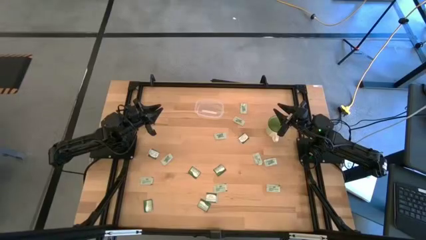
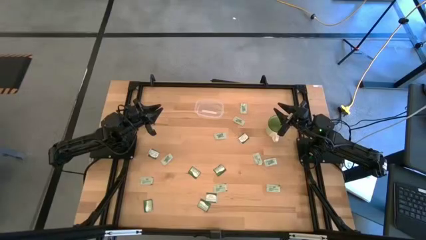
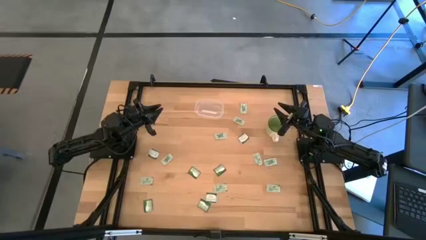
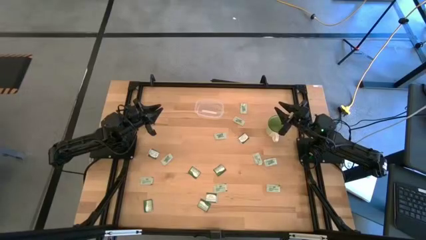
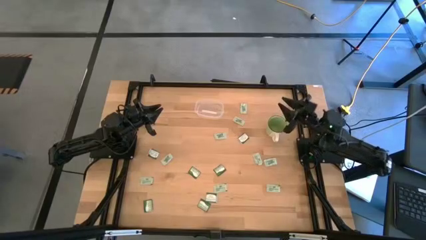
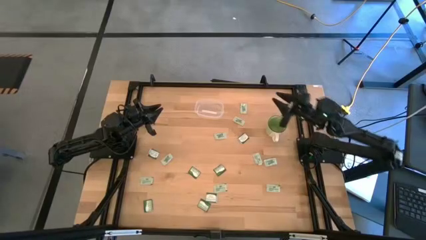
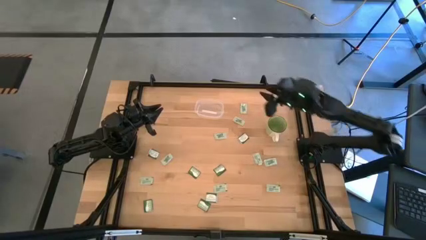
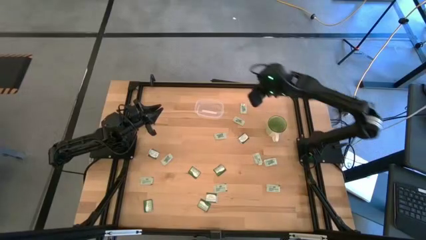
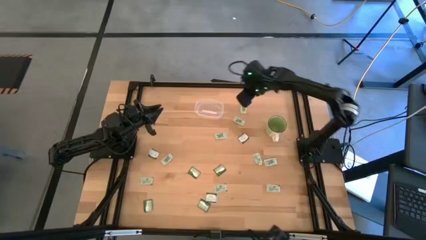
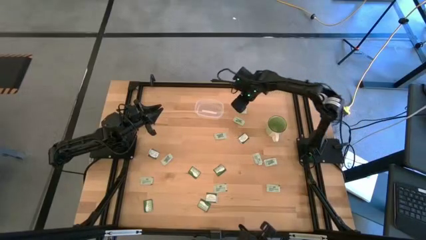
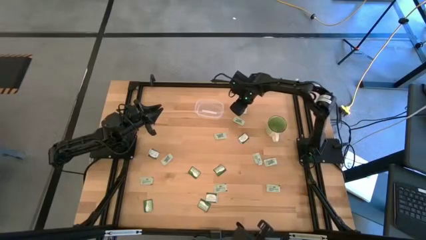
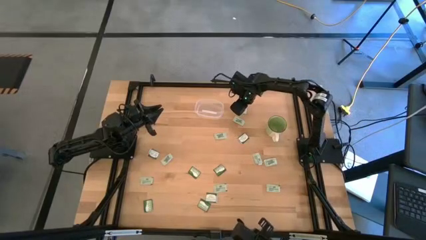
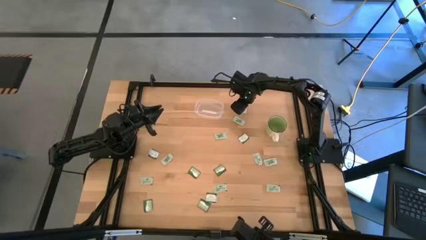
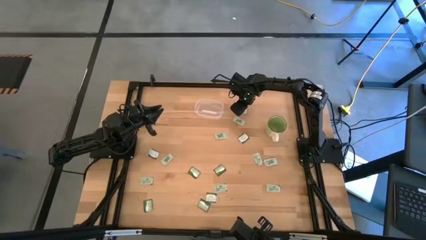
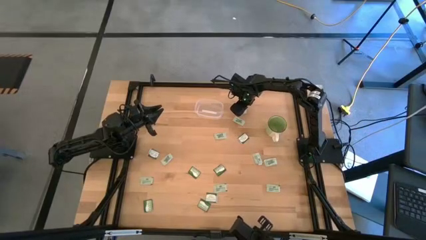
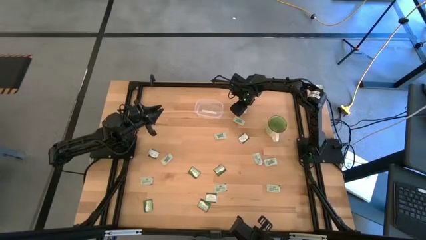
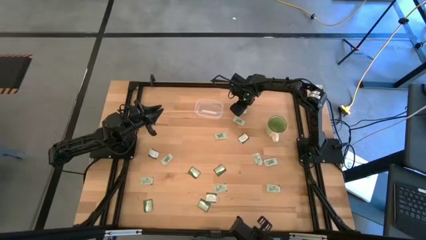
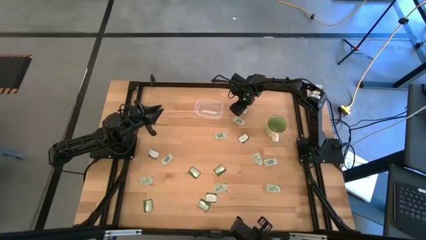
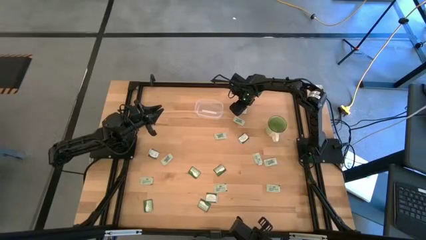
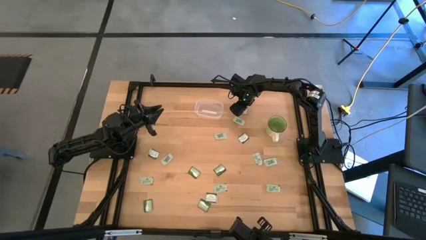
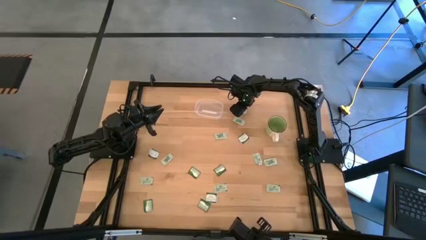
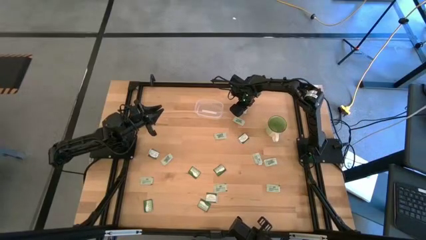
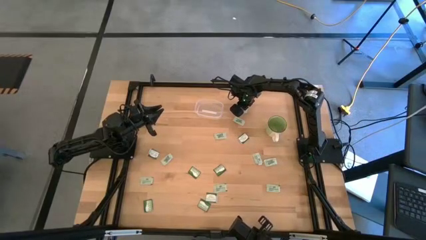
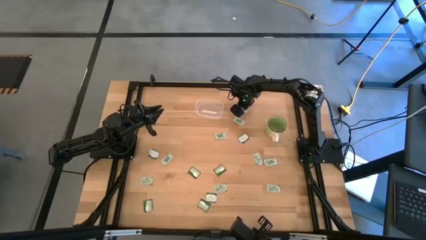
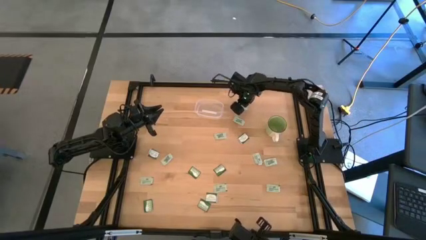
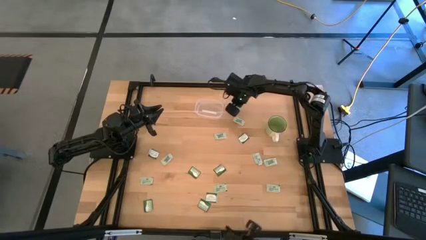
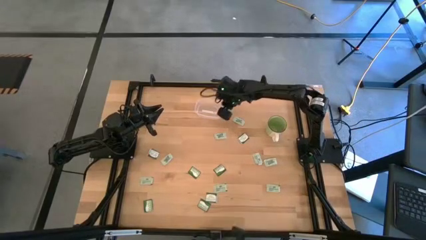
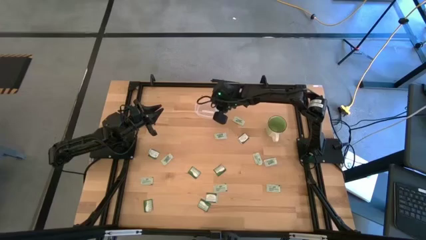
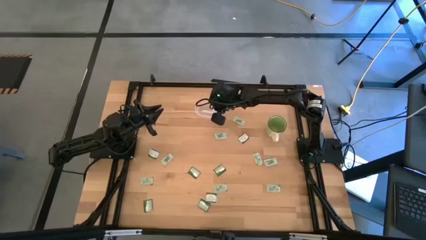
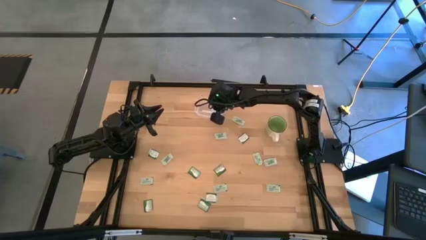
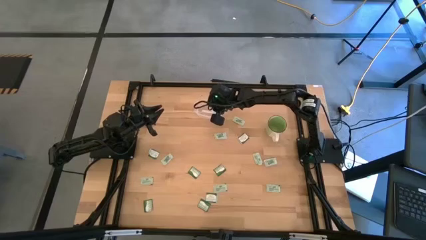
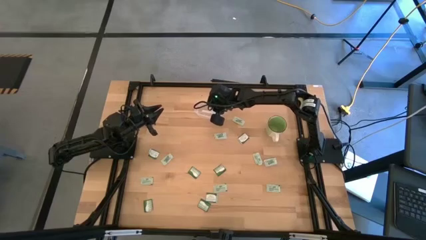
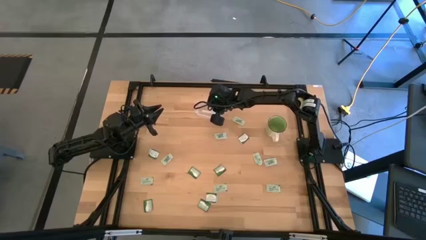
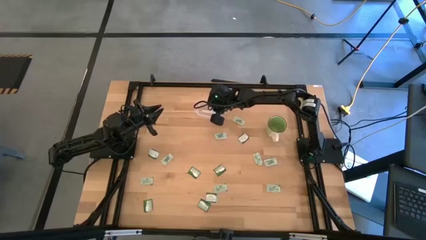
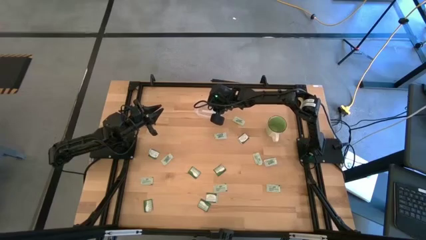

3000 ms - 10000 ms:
Task: Pick and place items into bin
Put the green stevia packet into the bin

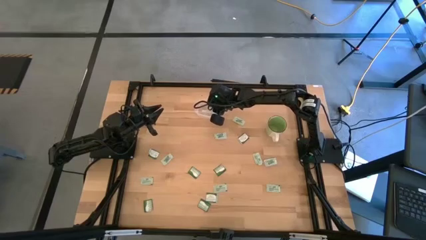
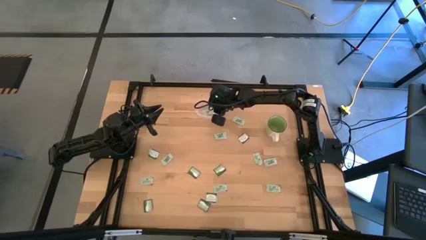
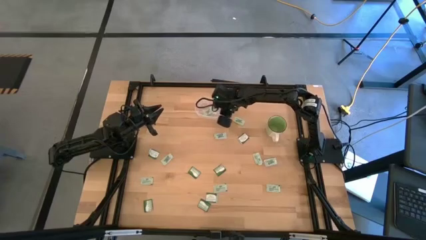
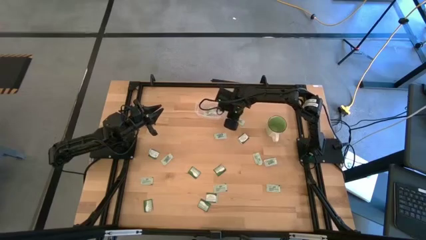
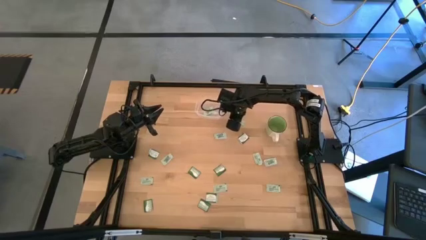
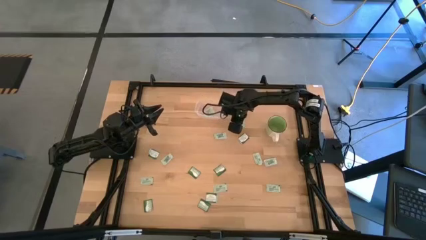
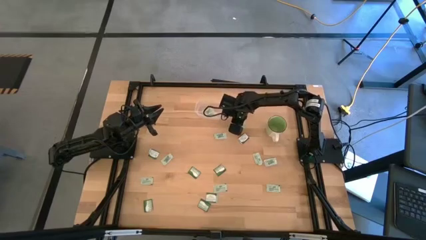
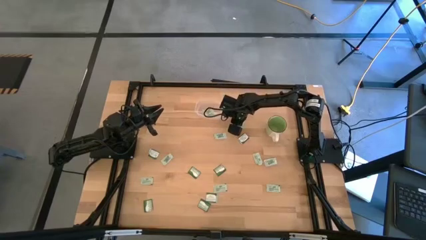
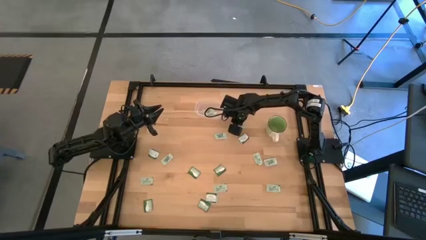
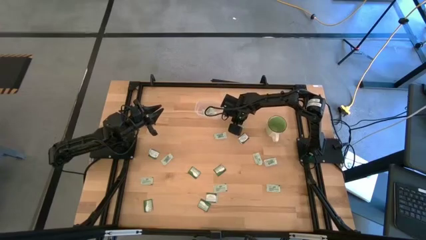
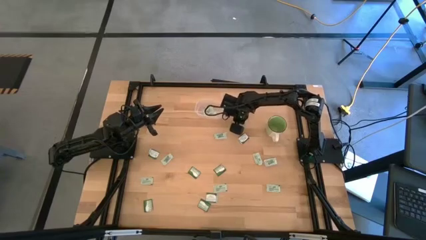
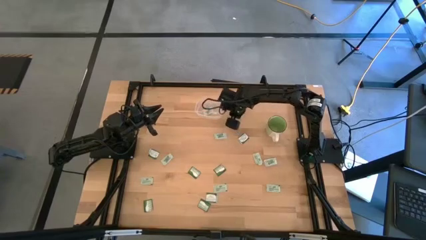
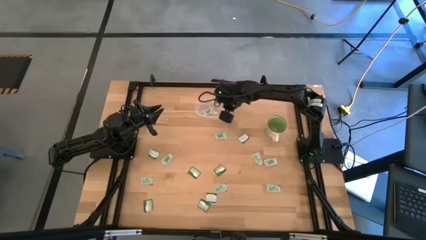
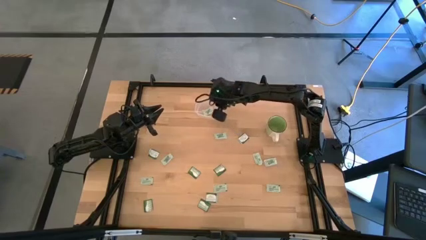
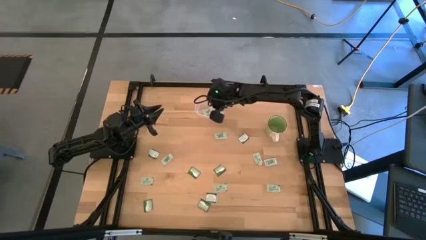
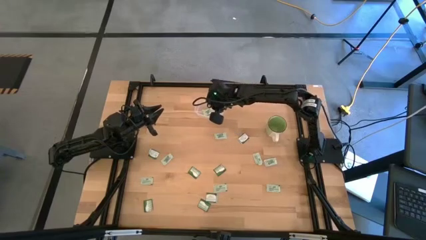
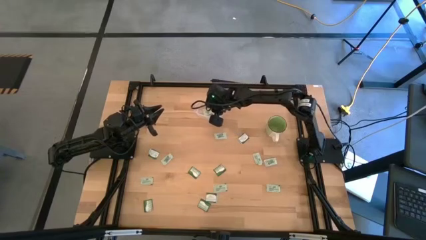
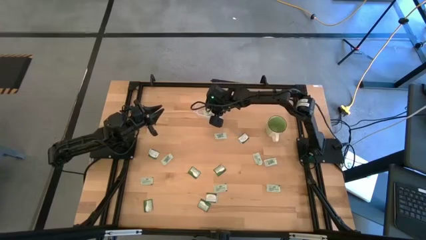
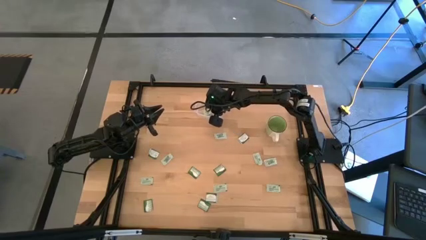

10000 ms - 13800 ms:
Put the green stevia packet into the bin

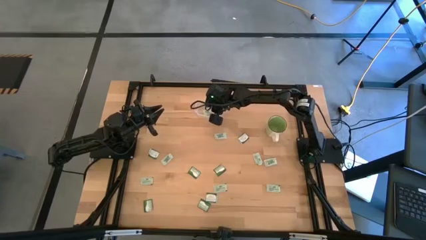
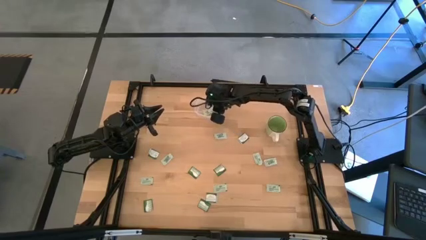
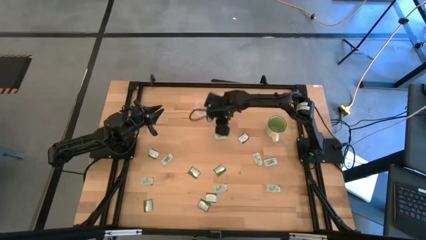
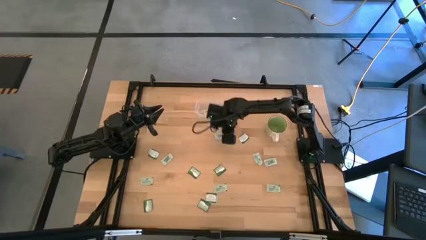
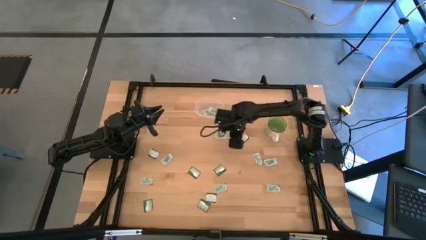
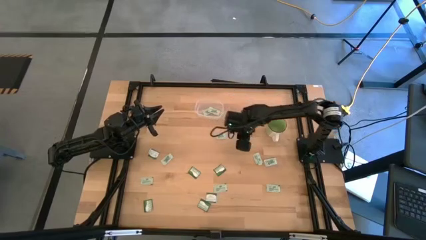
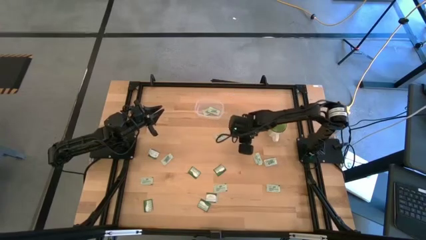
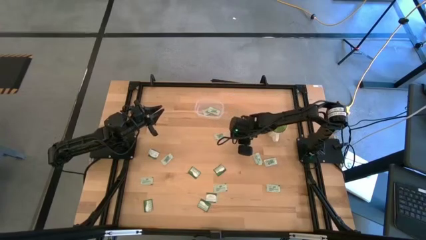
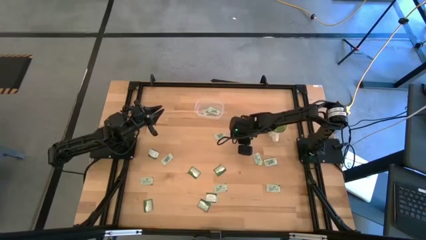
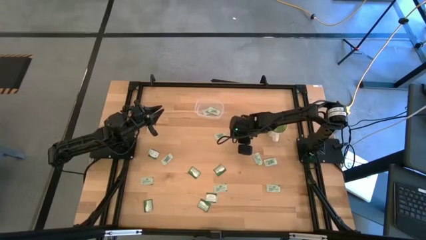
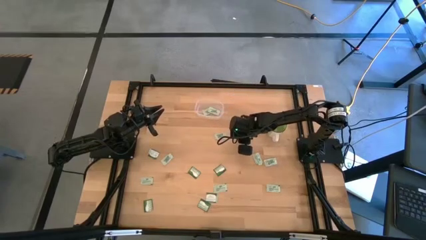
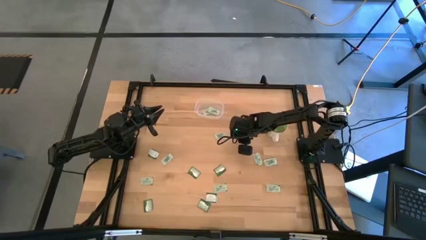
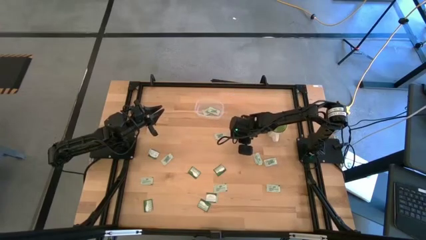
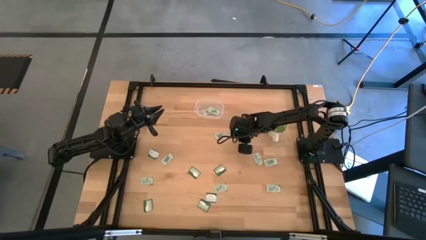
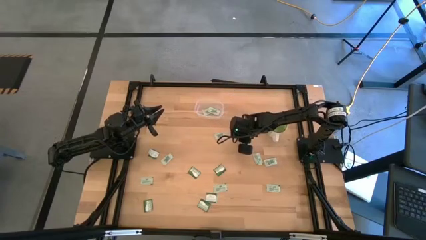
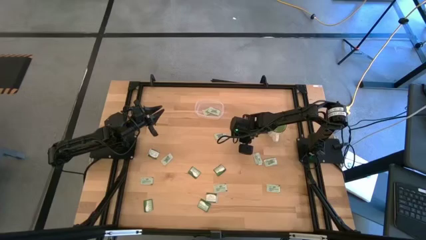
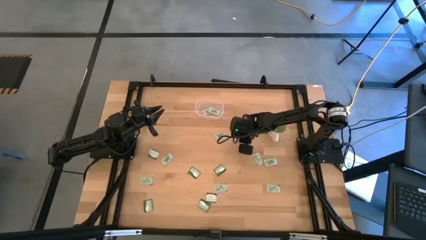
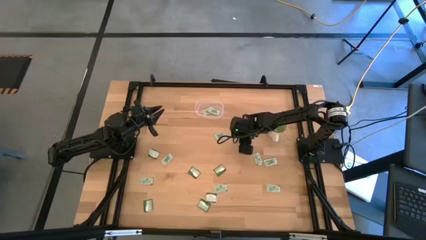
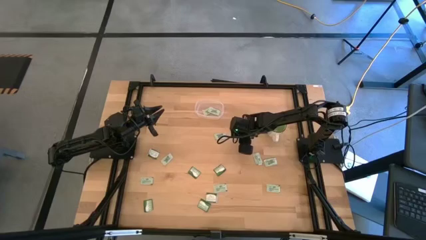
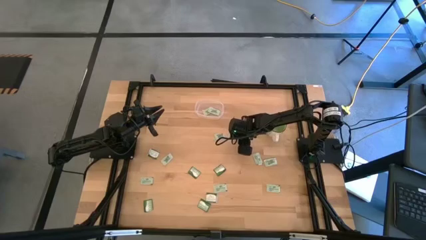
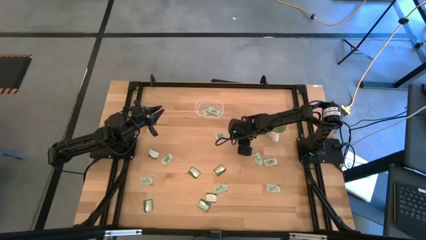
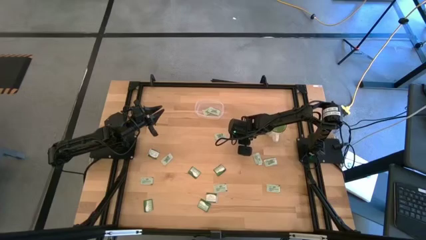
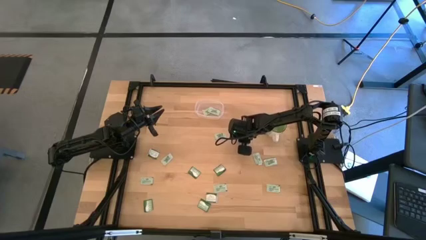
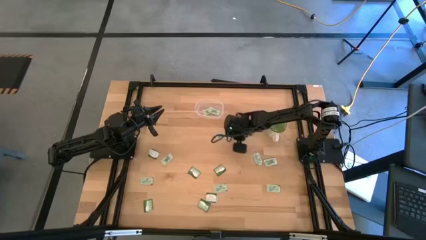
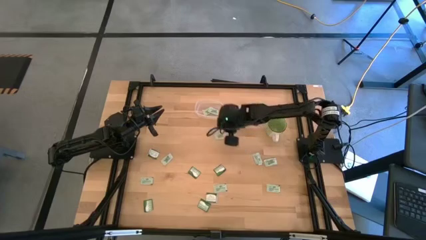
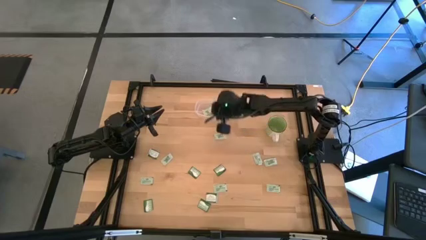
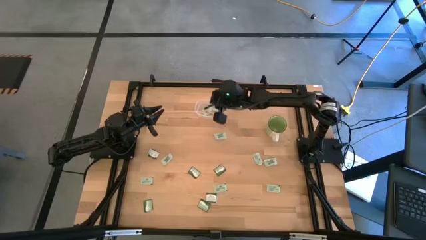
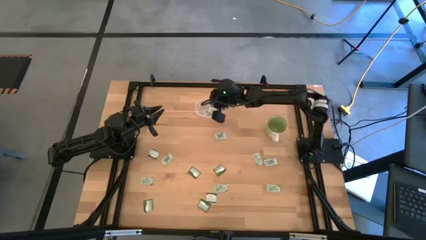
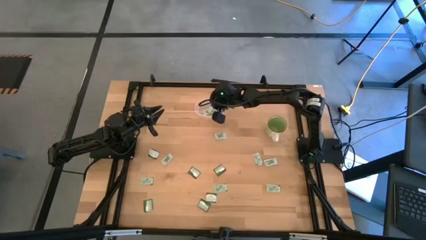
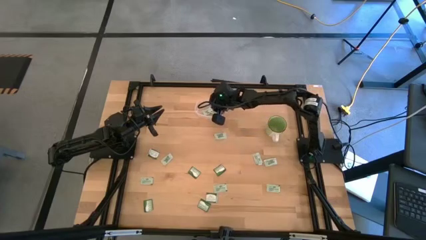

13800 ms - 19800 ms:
Put the white stevia packet into the bin
